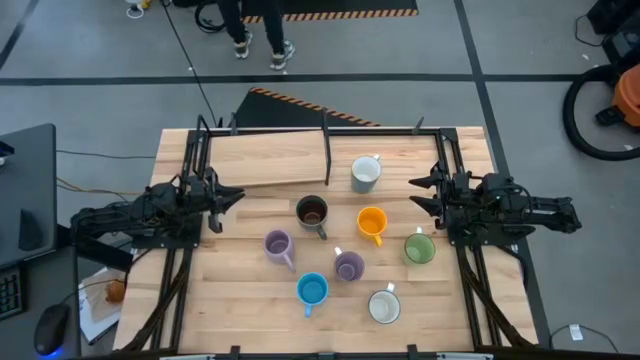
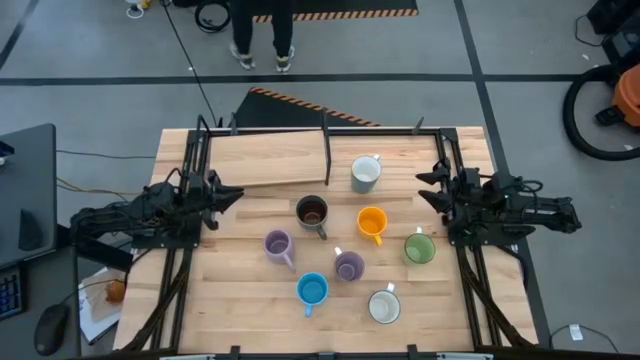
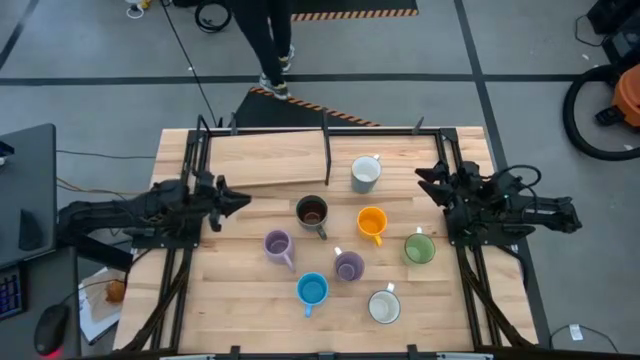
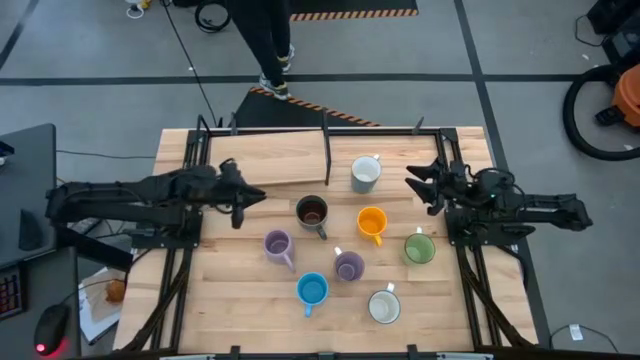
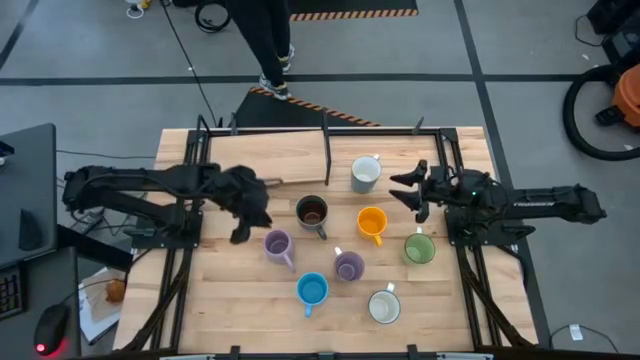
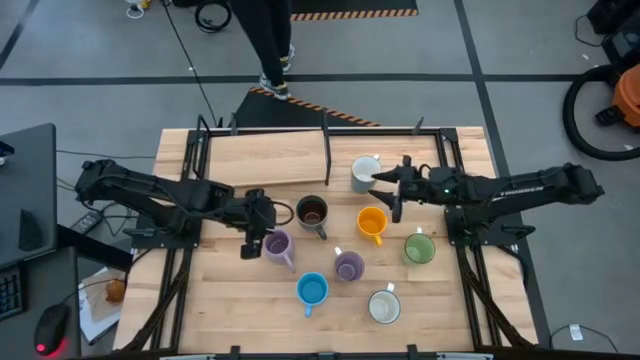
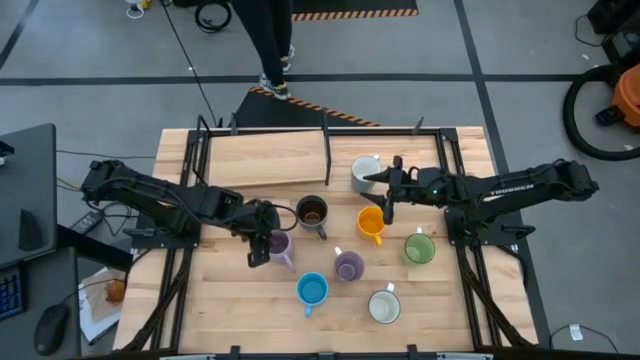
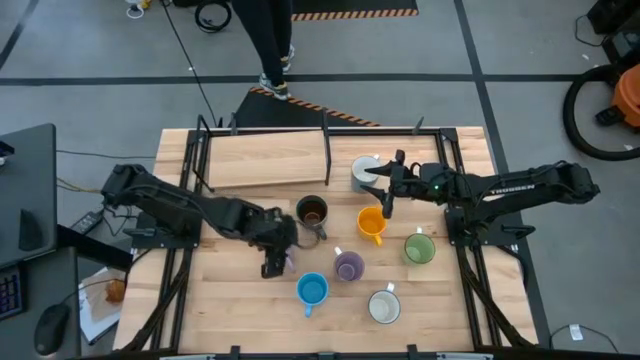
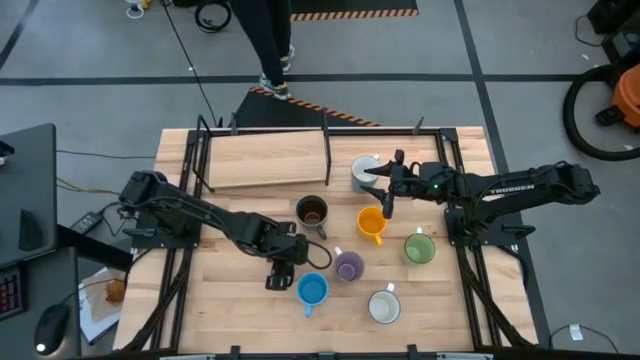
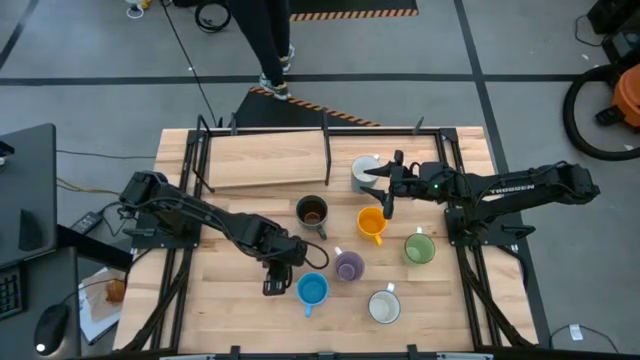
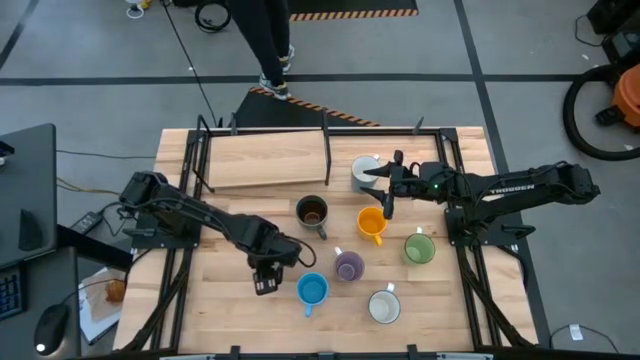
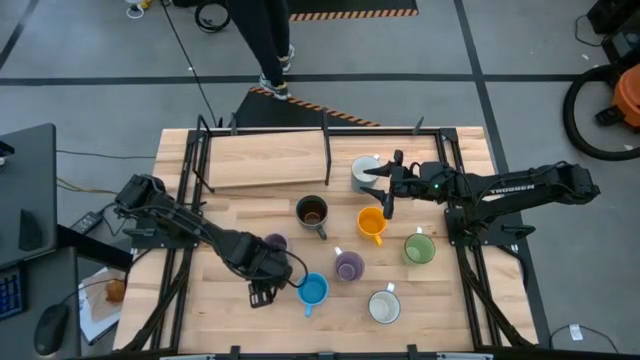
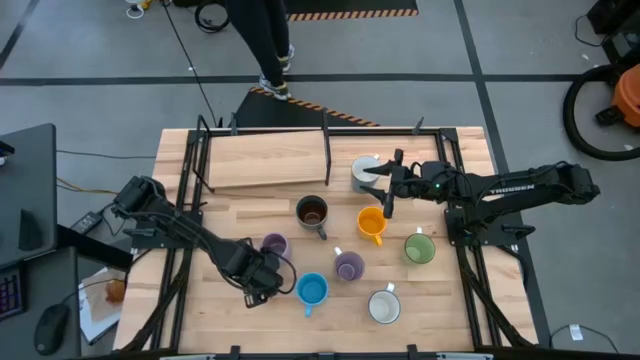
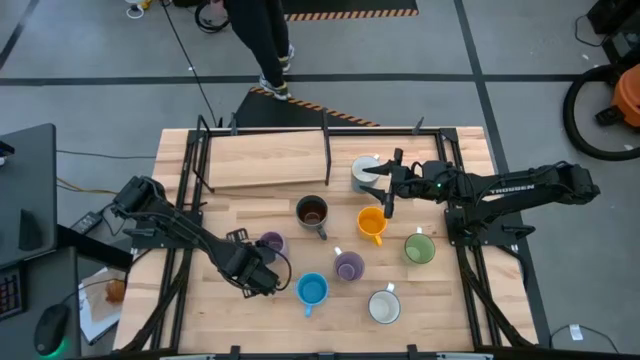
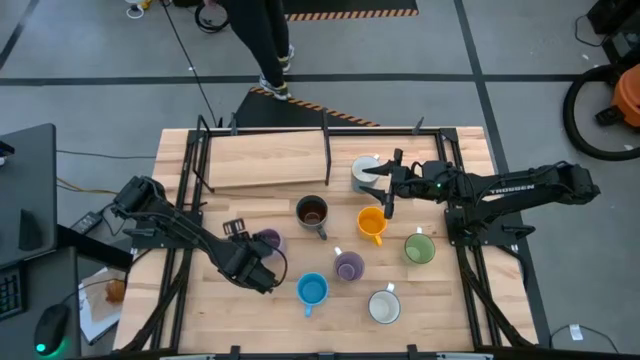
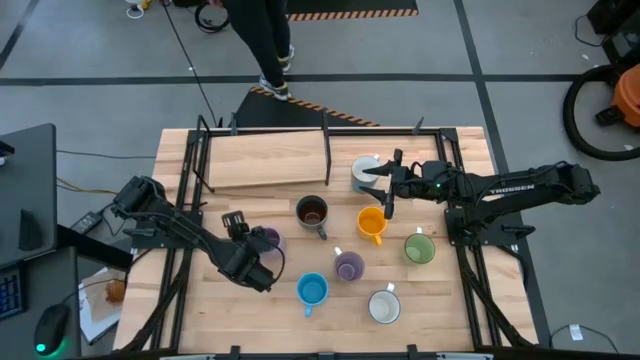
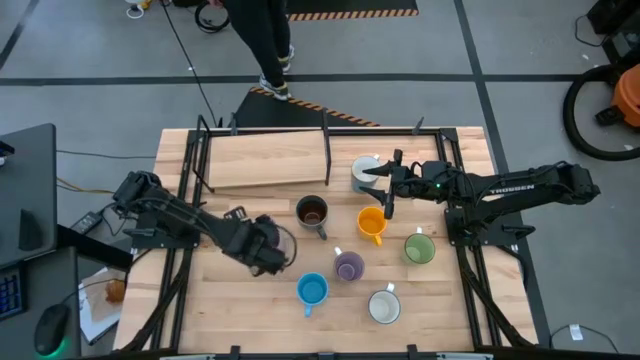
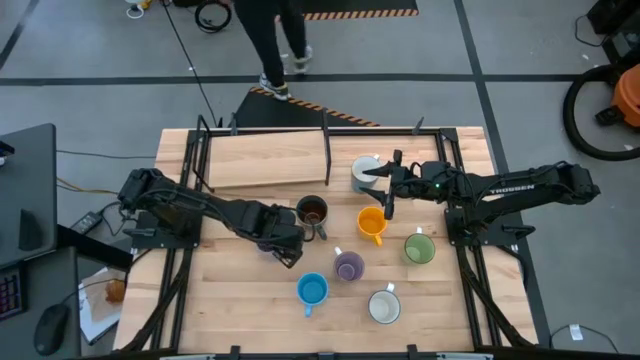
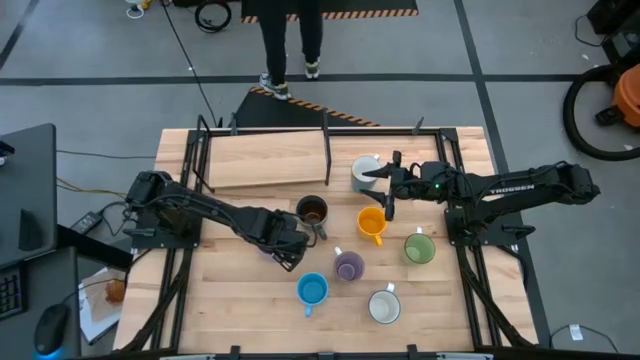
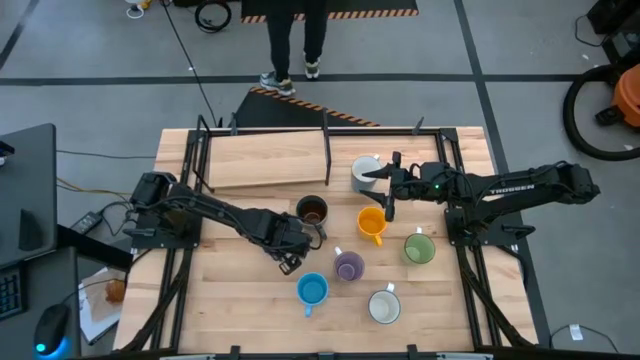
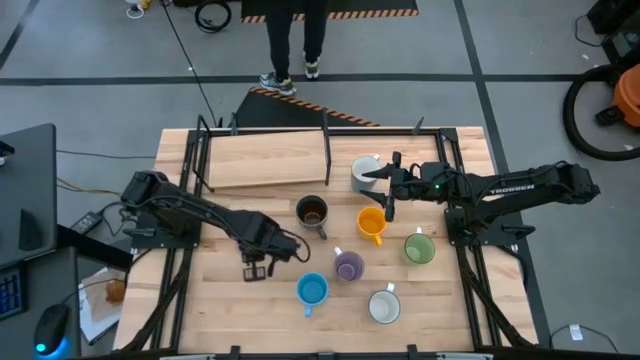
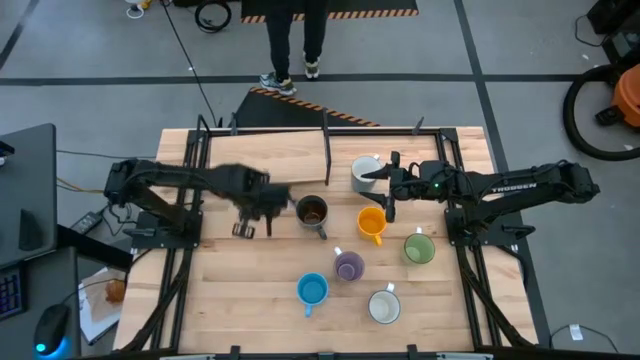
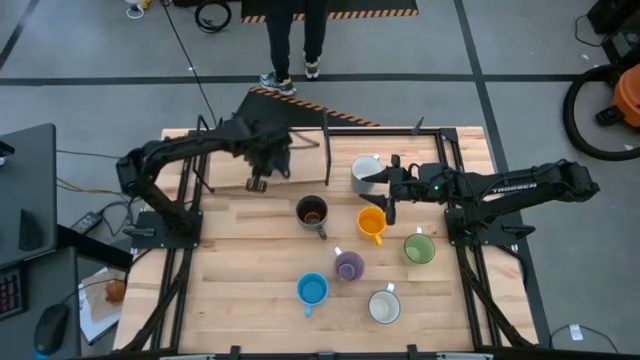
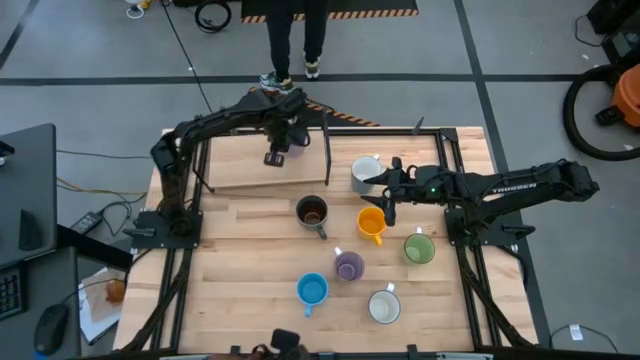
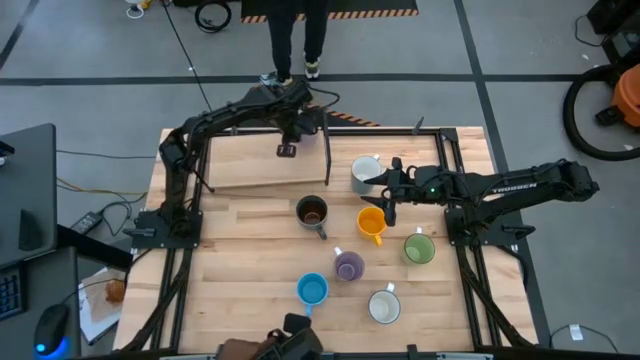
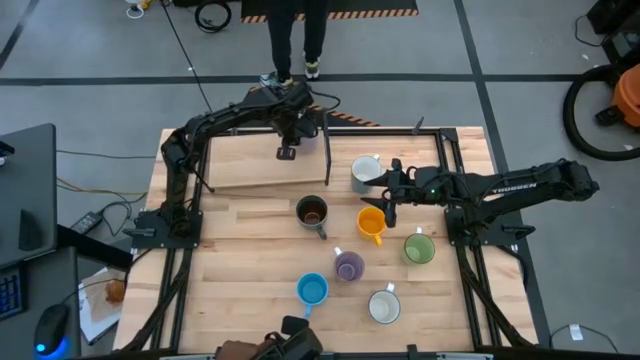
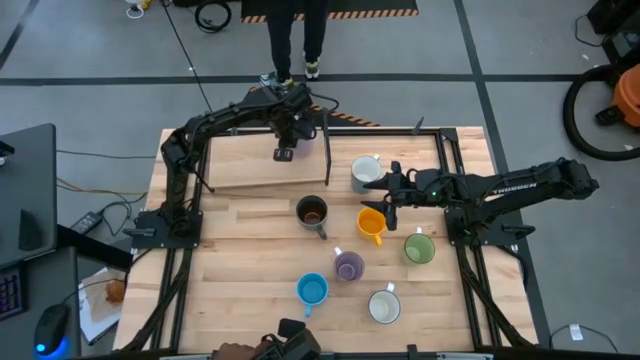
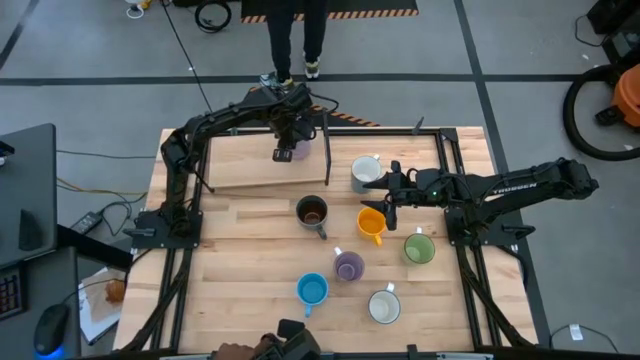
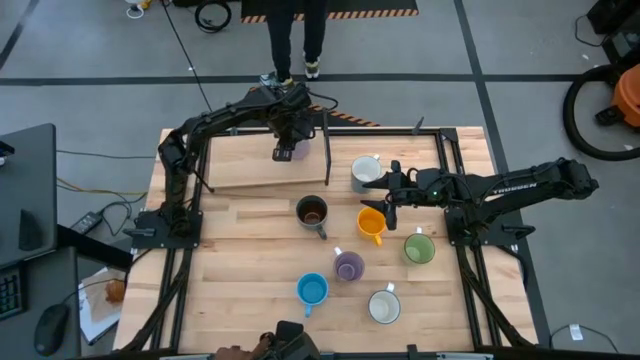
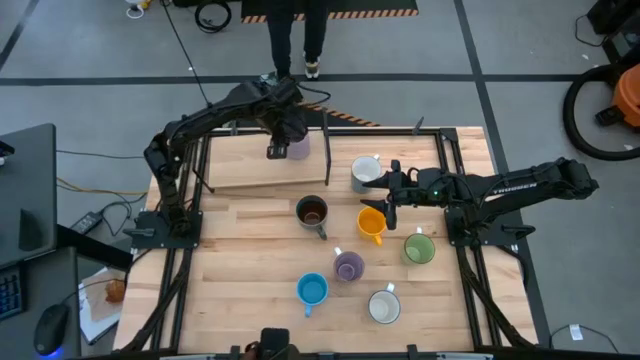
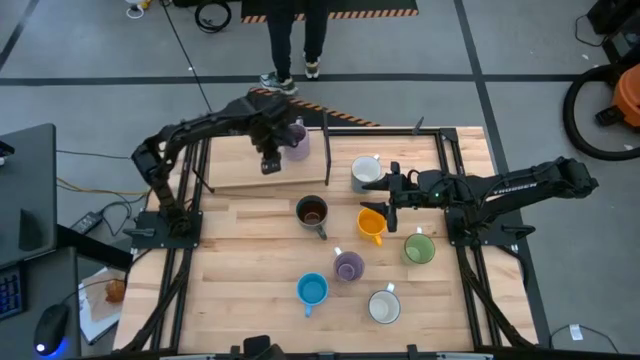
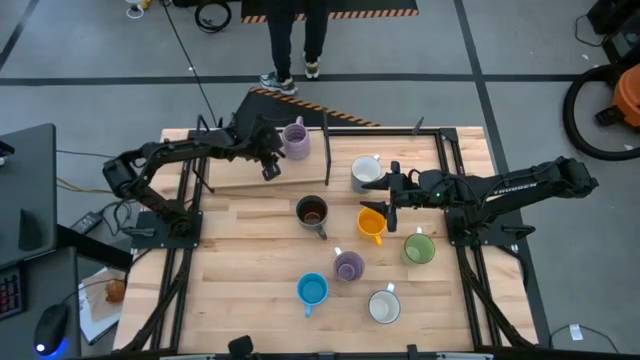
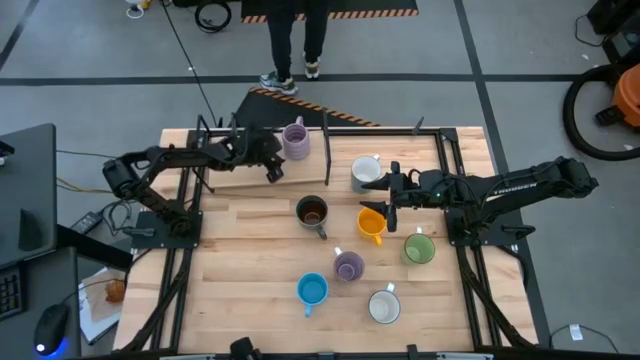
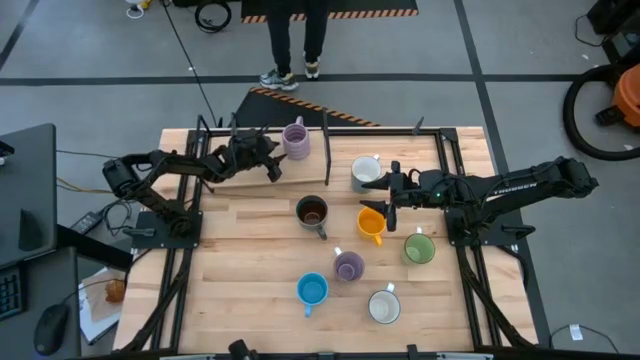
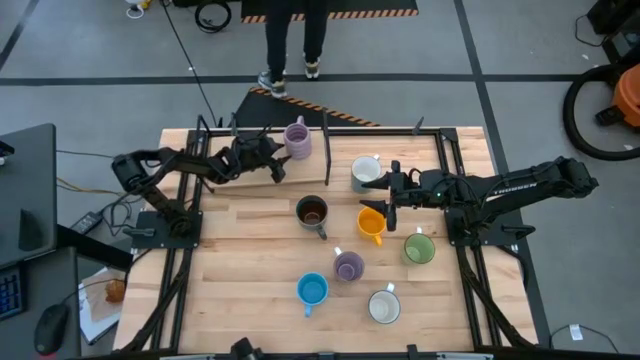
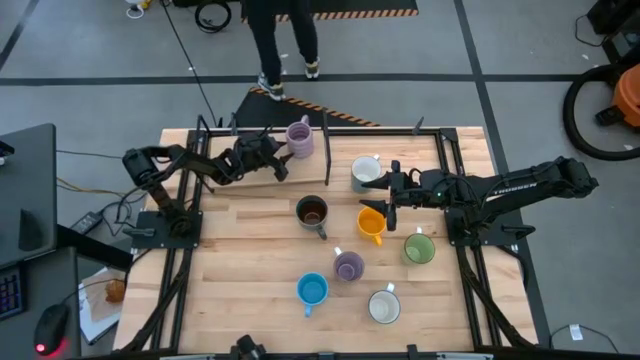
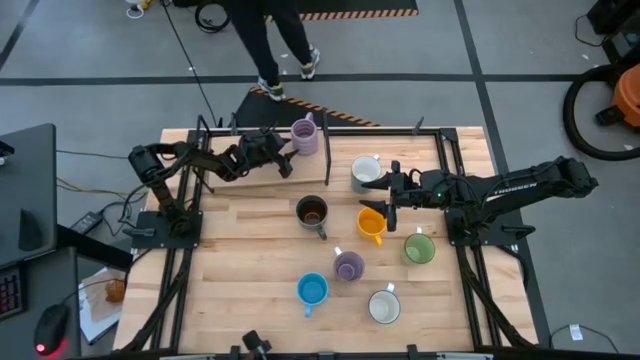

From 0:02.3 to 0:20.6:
Task: Place coffee mugs
Put the purple mug on the shelf
